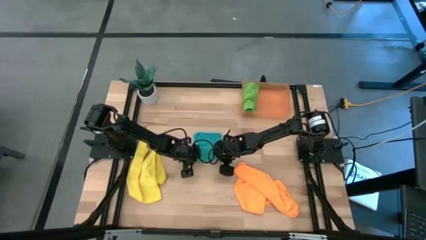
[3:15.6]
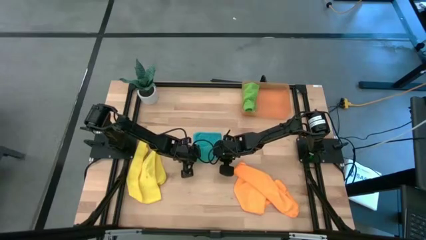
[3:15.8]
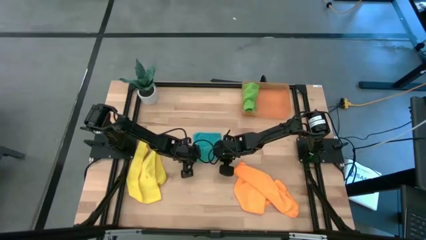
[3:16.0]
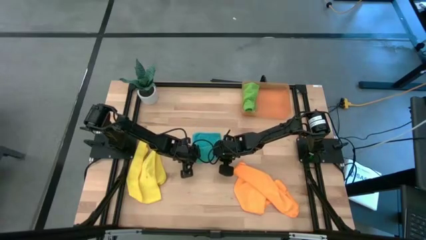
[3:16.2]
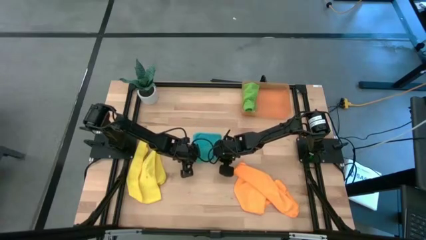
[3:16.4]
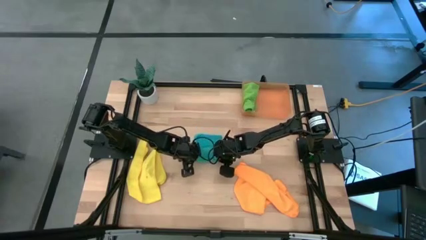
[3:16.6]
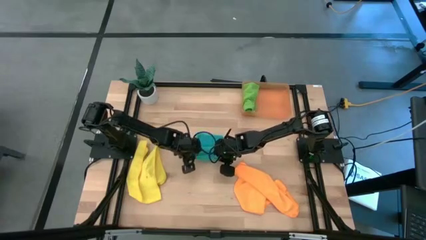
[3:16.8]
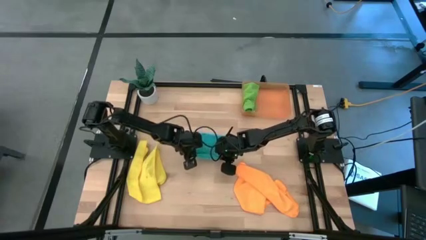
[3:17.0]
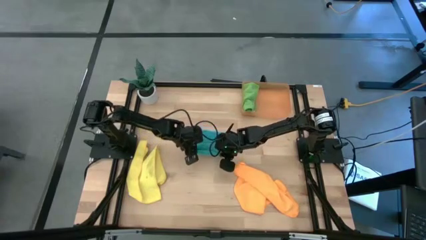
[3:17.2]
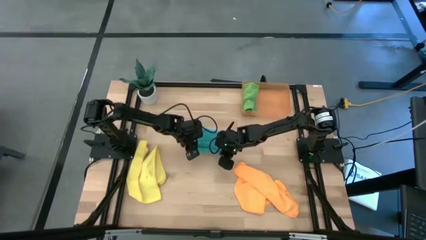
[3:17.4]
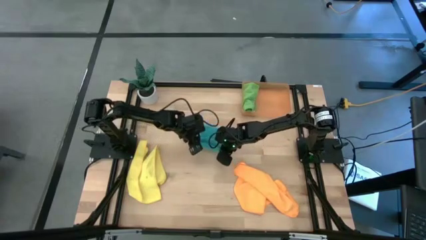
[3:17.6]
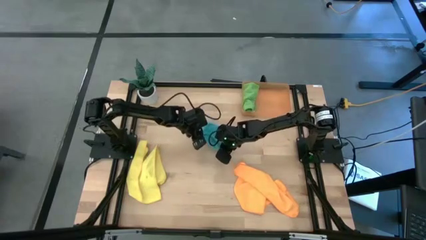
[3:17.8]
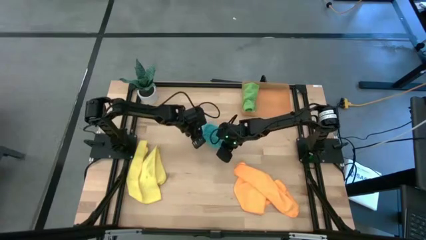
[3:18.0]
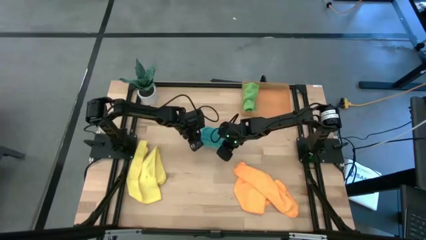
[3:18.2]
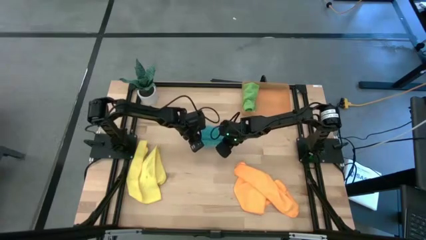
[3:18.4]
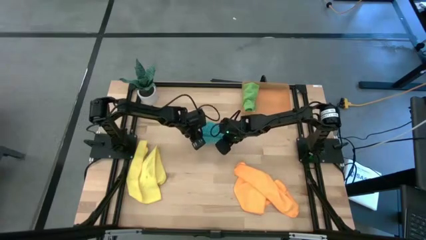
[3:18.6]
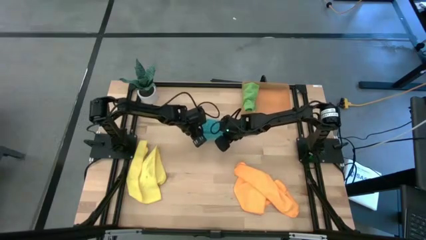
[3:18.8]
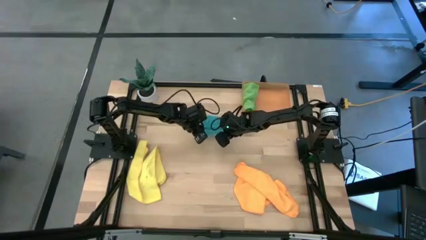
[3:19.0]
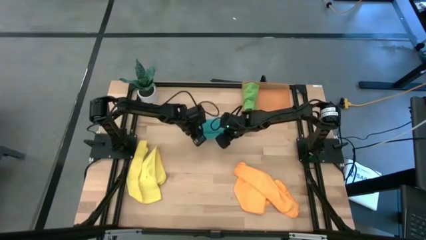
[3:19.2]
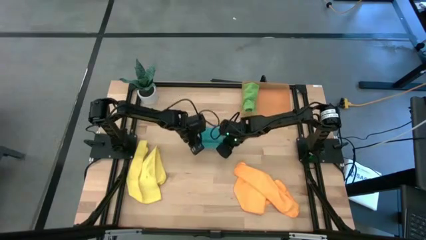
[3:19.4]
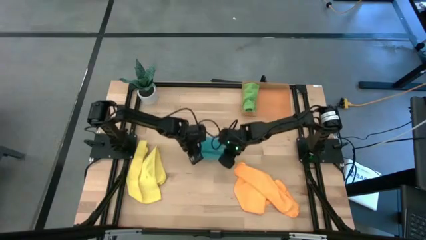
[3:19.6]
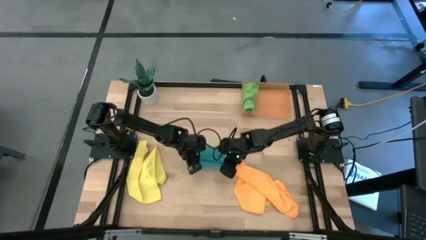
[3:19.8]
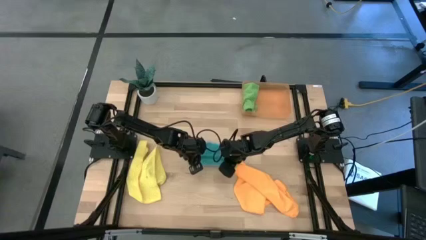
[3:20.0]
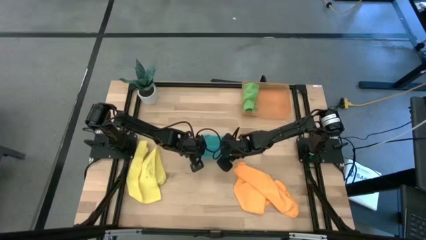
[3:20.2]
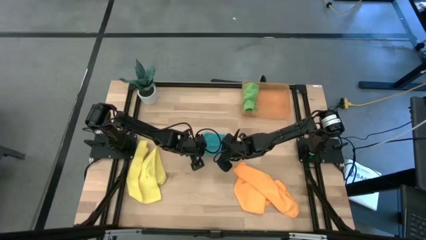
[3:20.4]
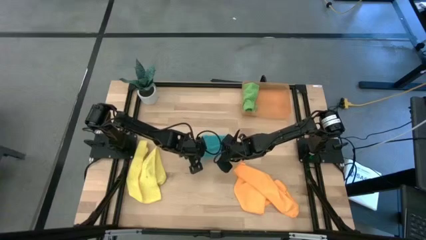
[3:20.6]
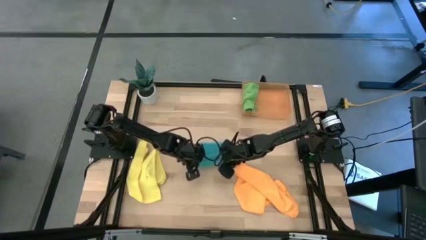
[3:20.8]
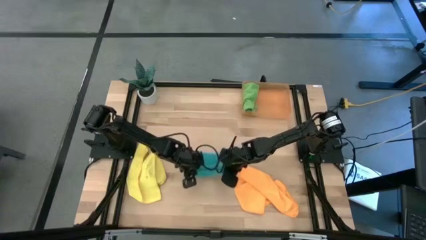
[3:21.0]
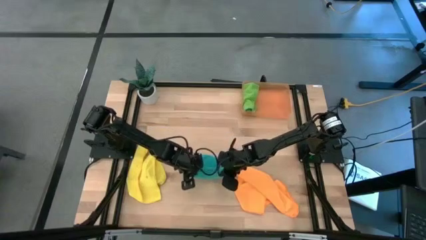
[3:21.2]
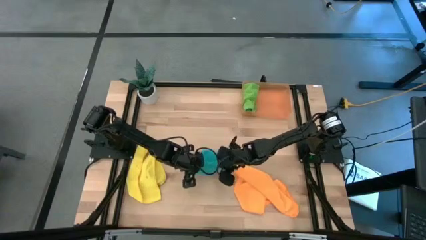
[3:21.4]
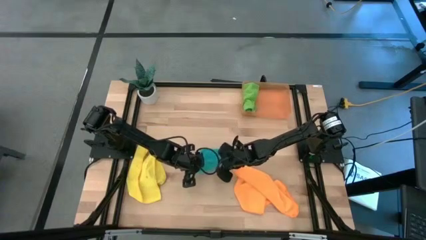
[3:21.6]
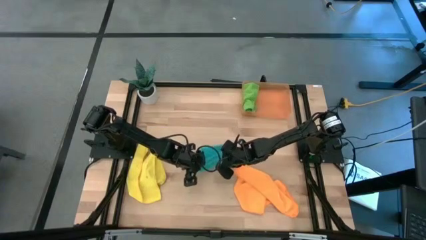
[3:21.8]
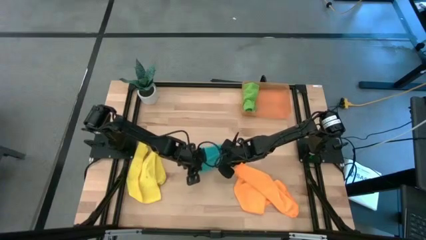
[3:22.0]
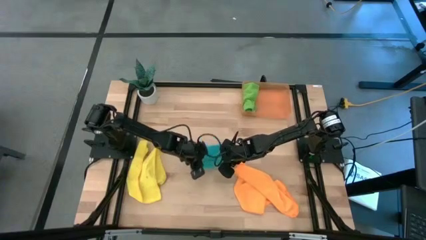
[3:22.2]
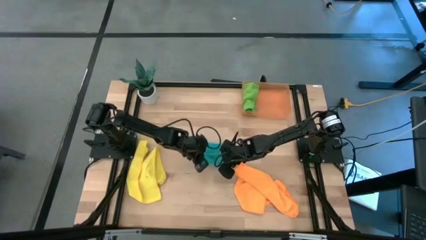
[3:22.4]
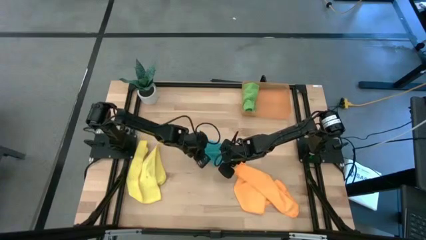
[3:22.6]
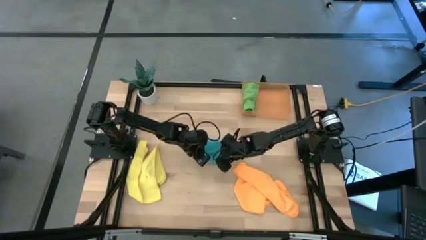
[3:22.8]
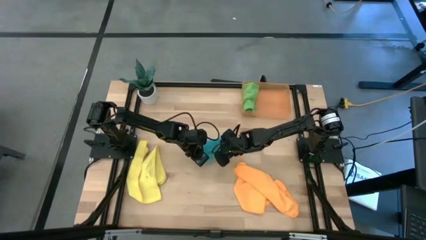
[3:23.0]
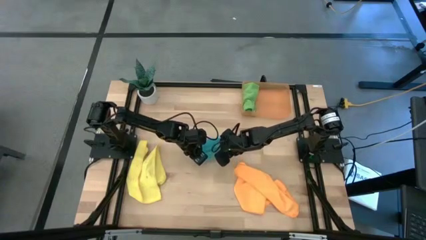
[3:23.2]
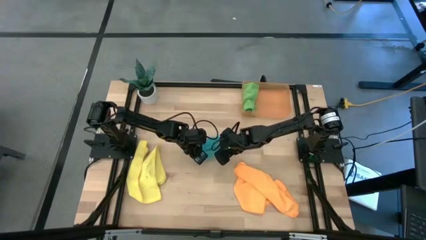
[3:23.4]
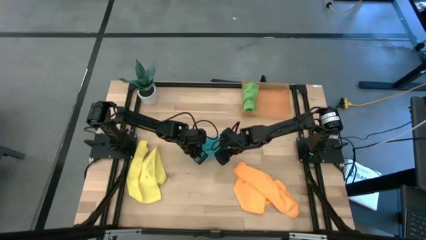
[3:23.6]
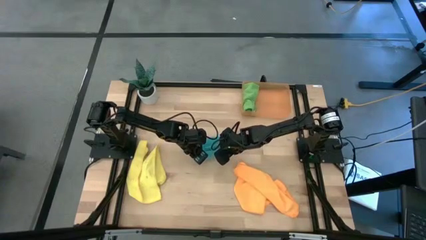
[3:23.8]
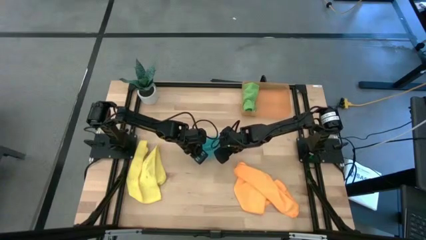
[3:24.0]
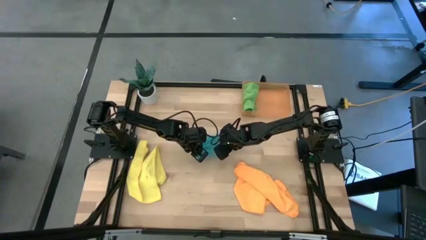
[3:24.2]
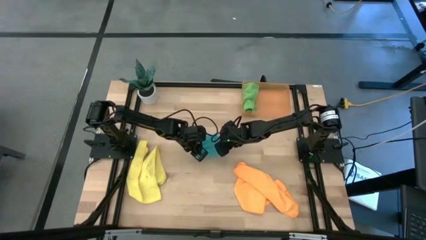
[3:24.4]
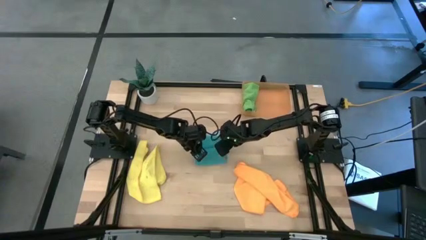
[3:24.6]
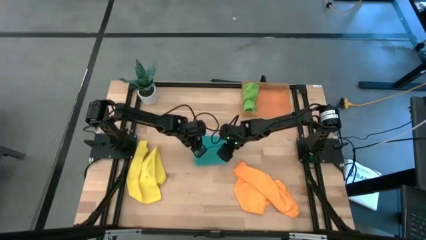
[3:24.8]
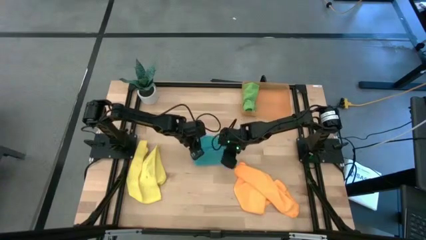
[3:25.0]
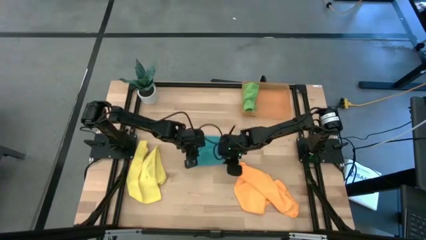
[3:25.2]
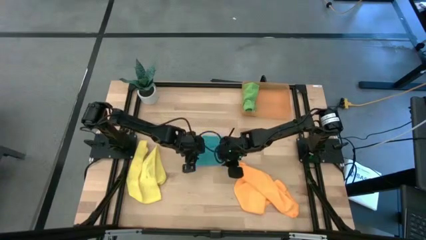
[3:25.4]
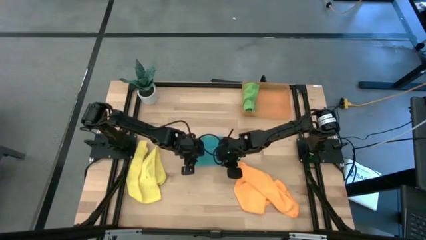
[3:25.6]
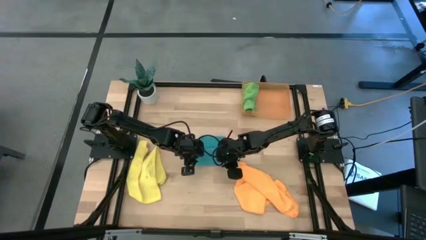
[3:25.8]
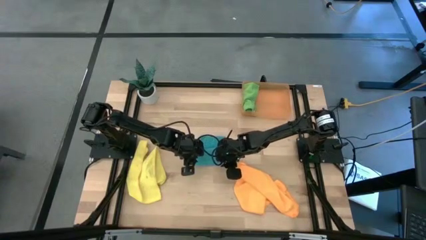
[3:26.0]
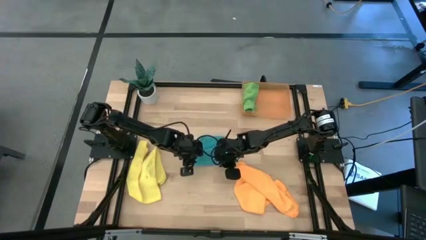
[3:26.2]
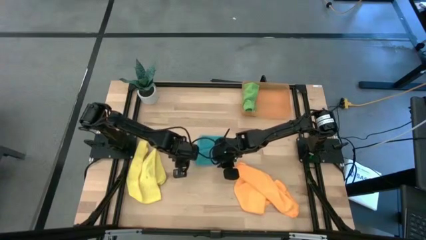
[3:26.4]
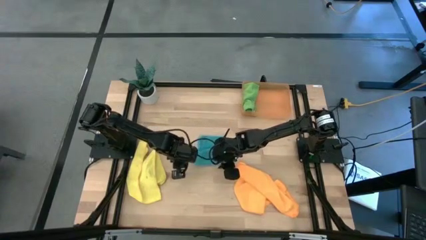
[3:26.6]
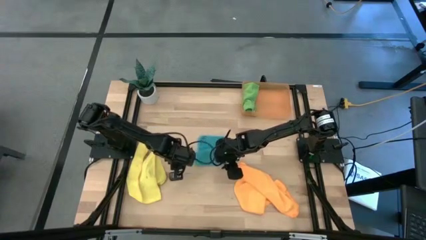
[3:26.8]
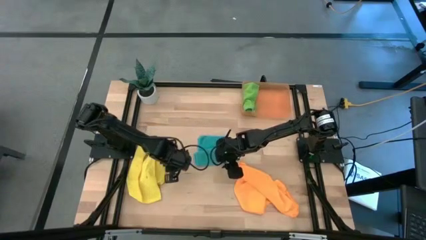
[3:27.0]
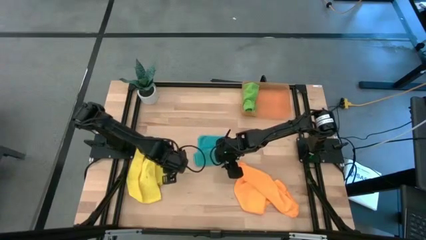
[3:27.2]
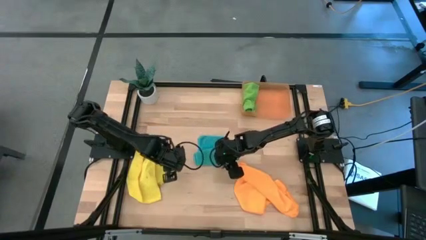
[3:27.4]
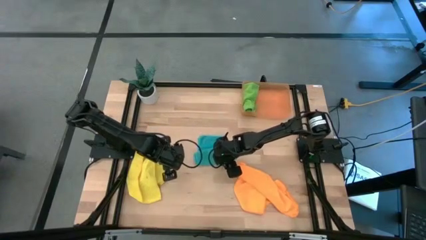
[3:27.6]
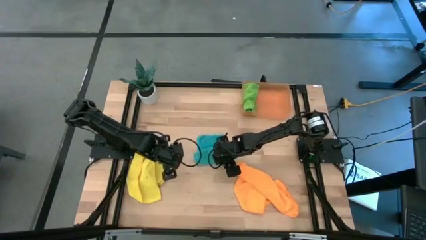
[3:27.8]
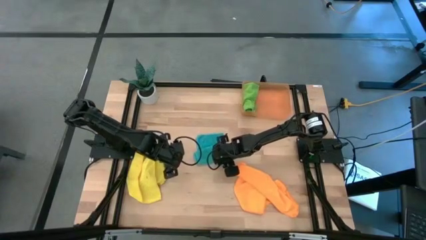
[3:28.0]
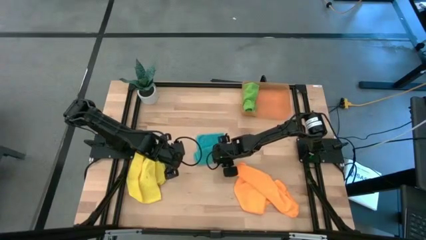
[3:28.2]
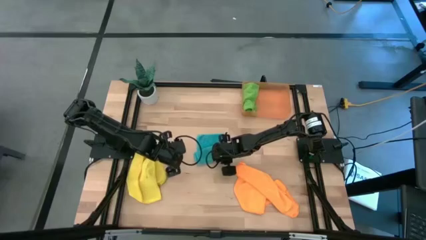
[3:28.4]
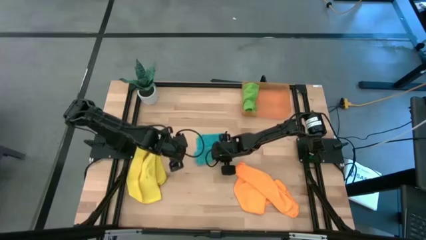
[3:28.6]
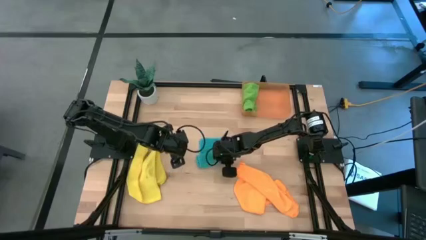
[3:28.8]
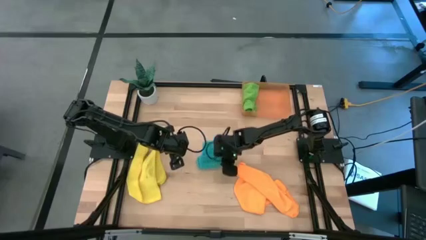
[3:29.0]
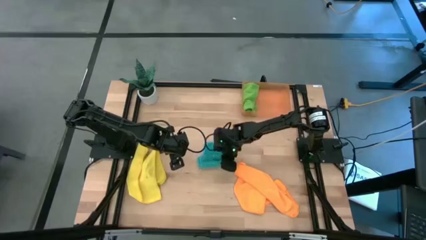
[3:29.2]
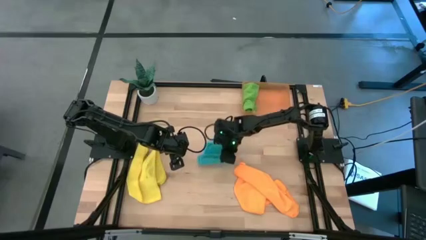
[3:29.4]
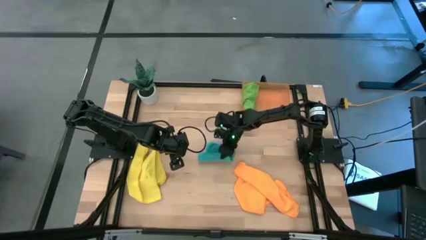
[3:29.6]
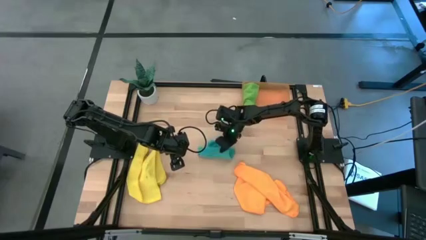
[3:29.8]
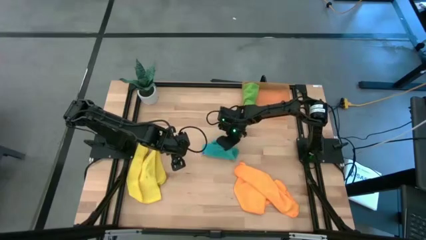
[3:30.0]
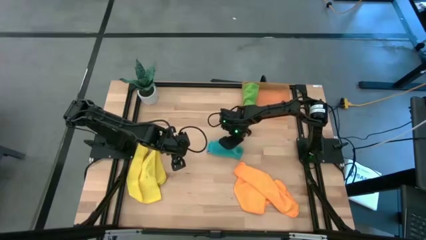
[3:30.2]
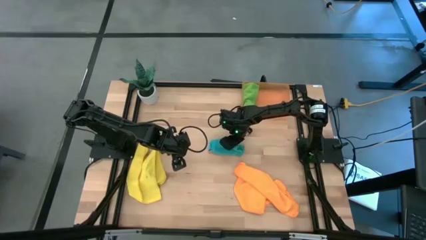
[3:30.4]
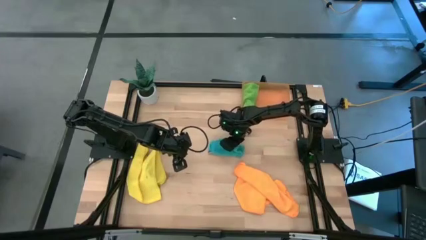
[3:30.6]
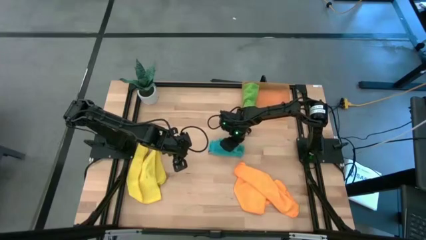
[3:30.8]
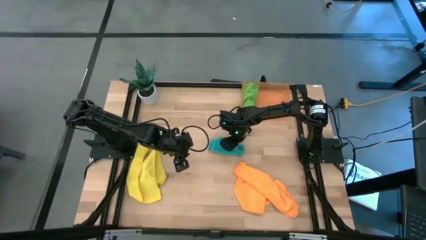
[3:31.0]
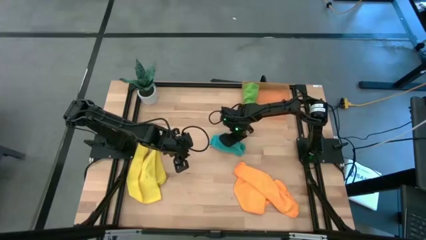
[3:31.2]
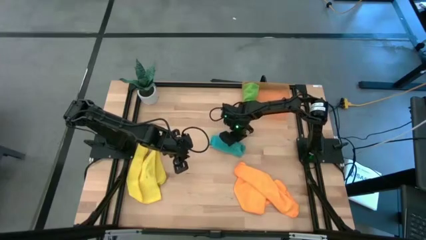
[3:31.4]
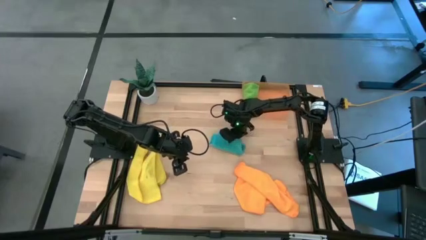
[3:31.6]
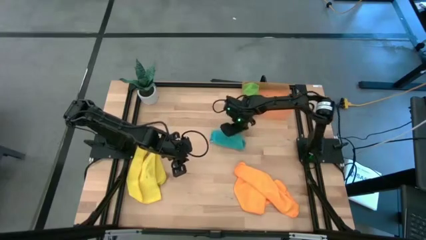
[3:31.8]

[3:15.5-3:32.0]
Task: Roll microfiber towels into tight, uniform cylinder then place into a basket
Fold the blue towel
